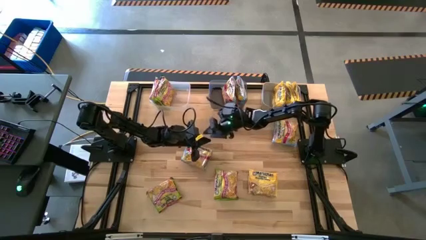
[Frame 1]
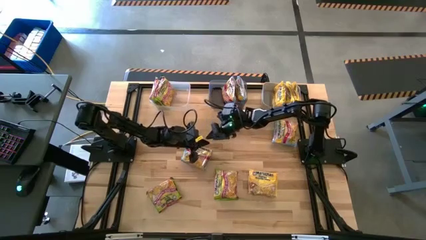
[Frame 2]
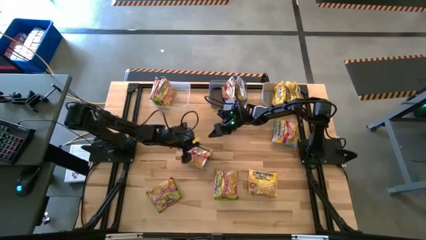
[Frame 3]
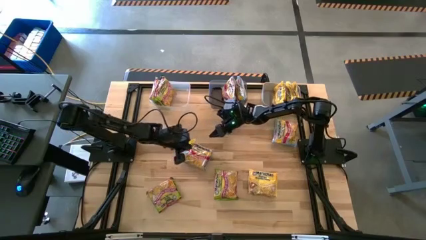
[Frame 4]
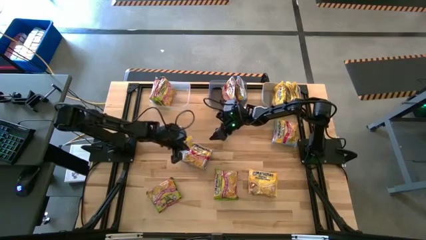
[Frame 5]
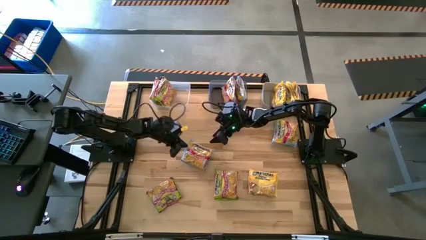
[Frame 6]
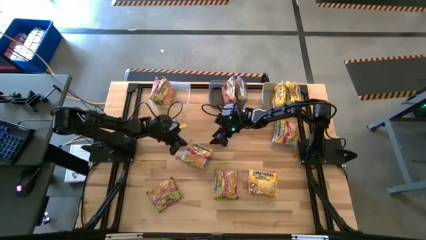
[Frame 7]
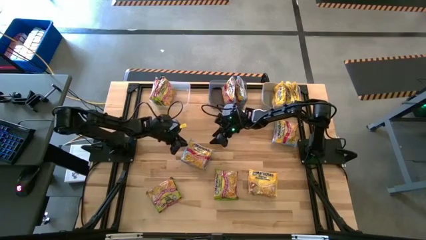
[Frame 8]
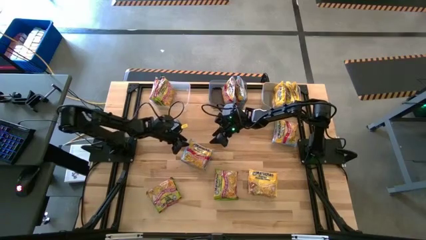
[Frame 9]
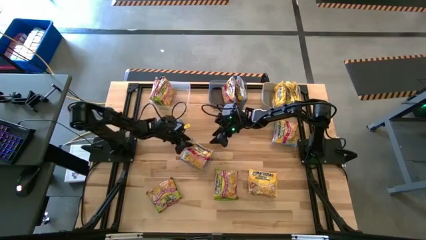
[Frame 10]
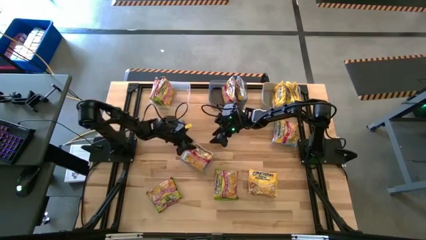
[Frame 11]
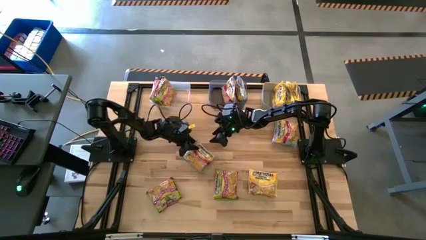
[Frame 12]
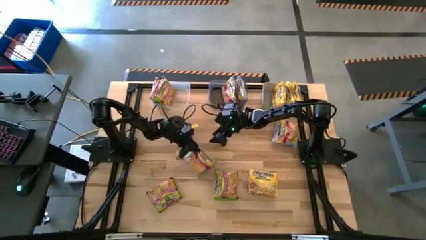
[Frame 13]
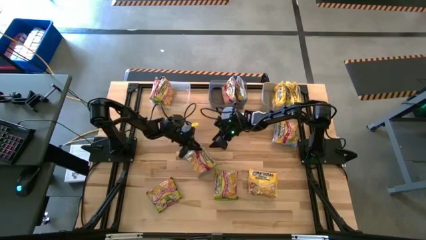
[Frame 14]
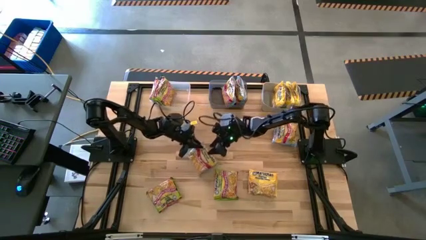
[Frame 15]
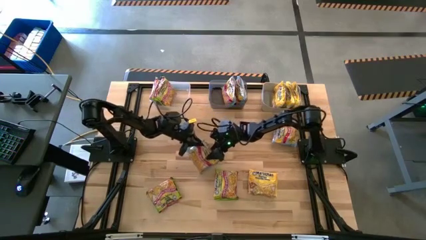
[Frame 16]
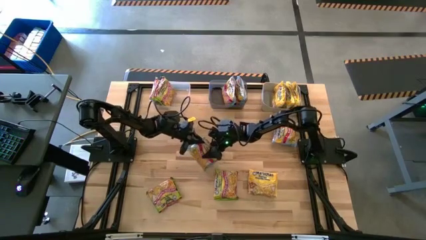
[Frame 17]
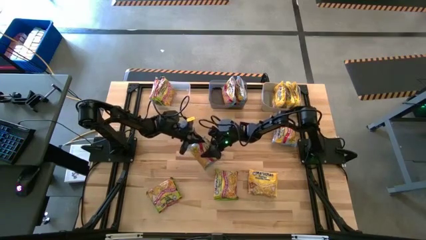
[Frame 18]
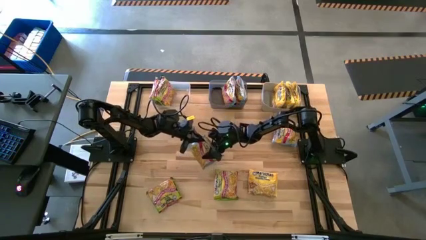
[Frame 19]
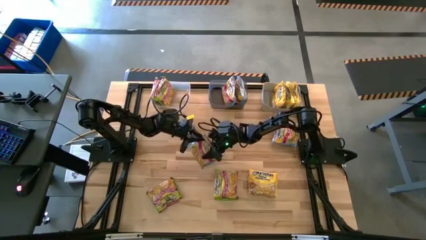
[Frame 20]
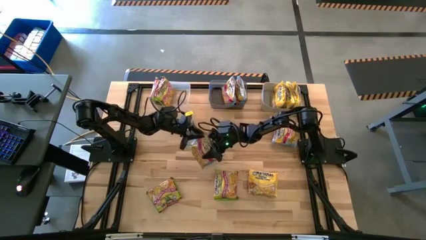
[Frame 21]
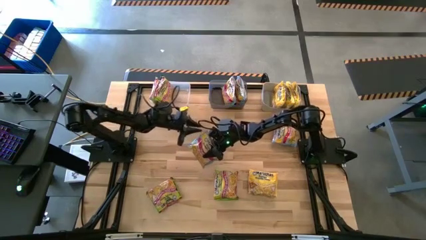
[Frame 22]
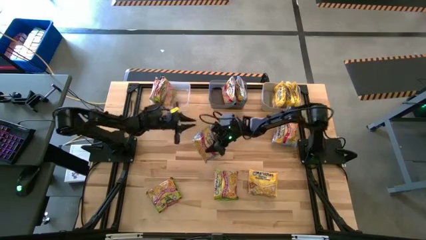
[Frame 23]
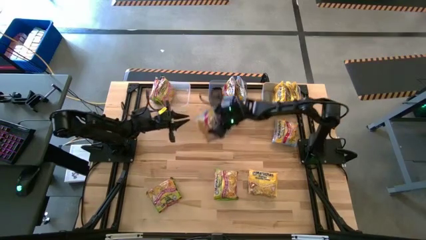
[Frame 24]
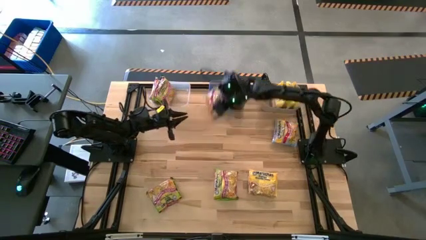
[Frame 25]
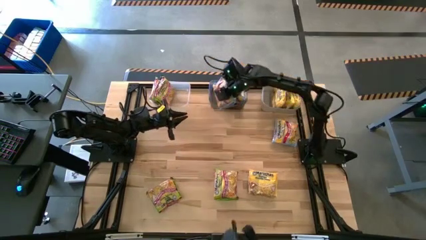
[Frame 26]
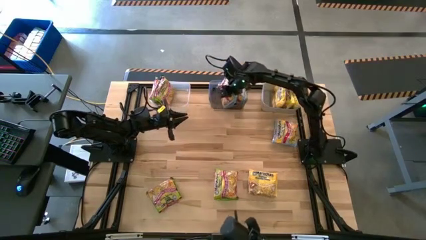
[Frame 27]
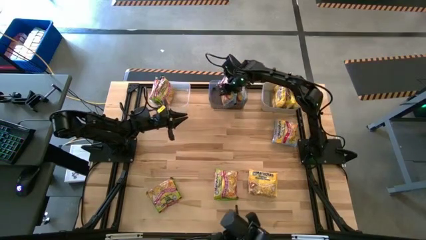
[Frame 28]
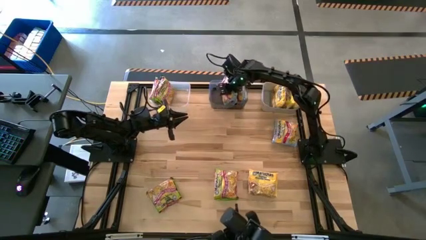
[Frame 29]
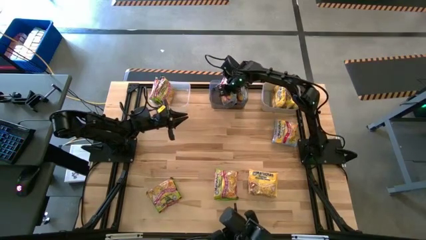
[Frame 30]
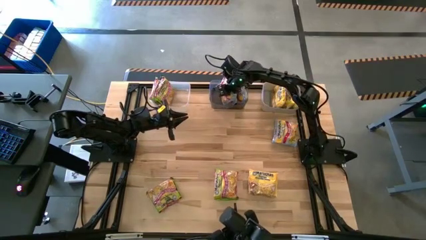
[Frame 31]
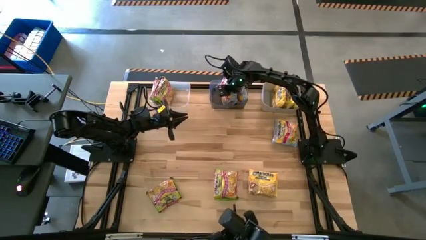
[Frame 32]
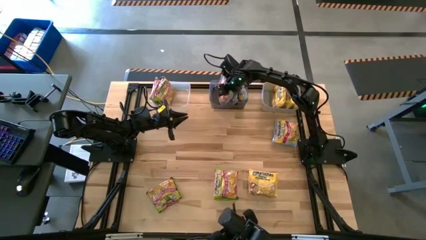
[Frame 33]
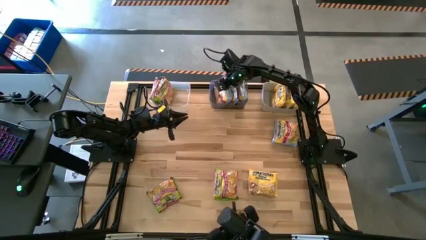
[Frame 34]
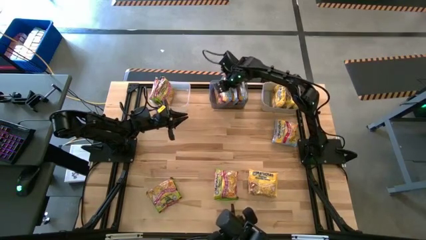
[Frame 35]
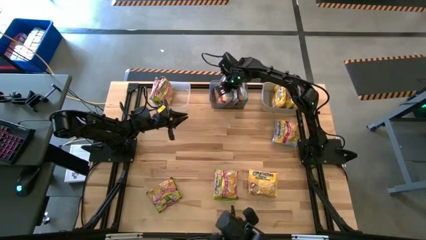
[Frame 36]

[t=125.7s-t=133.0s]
Task: Sort Maruchan noodles
Put the left blue noodle pack into the black bin

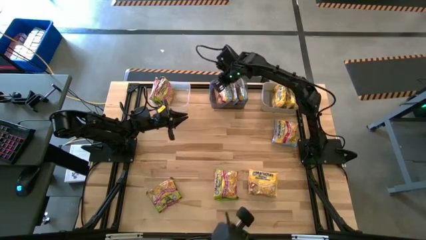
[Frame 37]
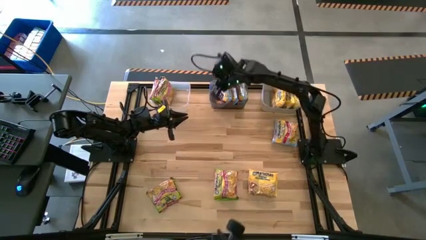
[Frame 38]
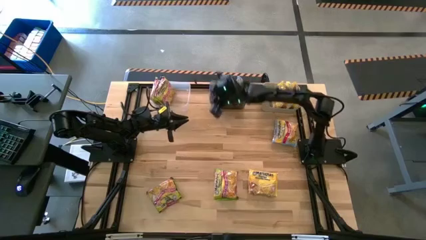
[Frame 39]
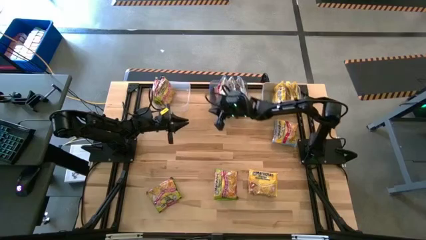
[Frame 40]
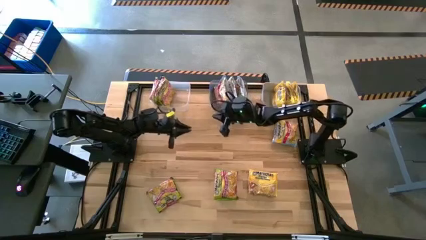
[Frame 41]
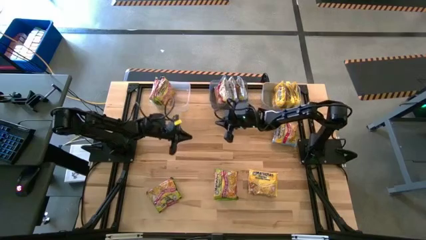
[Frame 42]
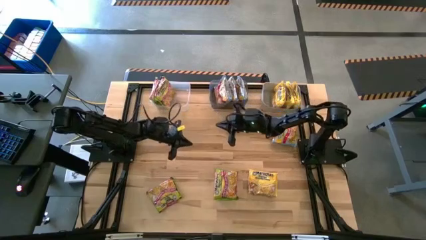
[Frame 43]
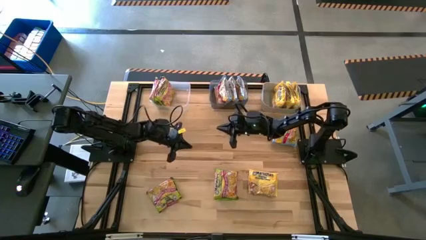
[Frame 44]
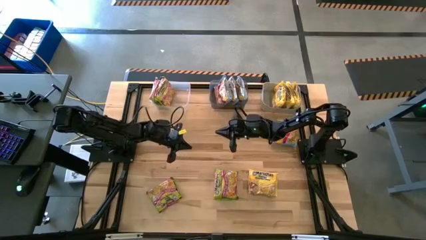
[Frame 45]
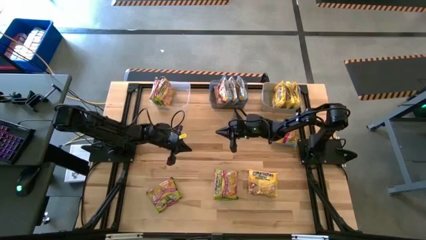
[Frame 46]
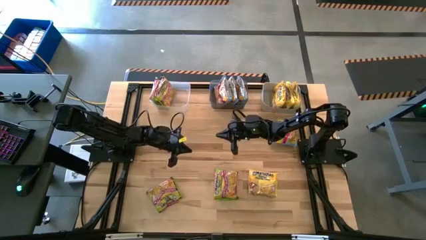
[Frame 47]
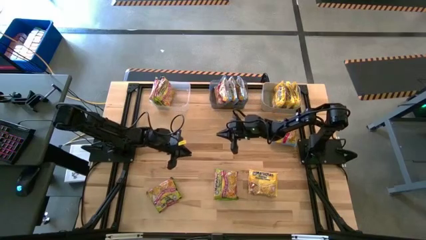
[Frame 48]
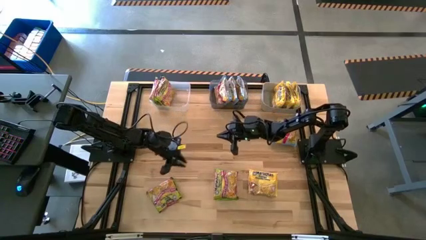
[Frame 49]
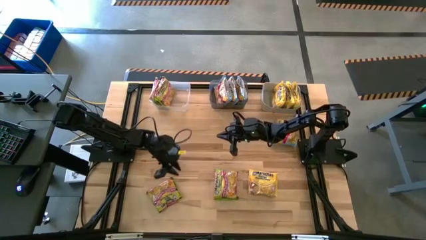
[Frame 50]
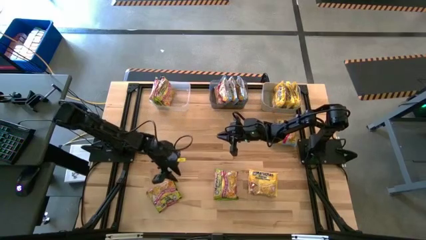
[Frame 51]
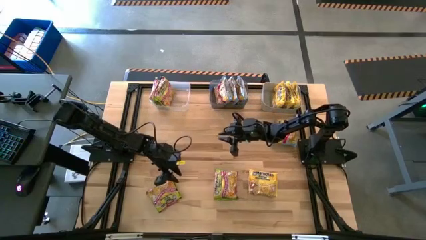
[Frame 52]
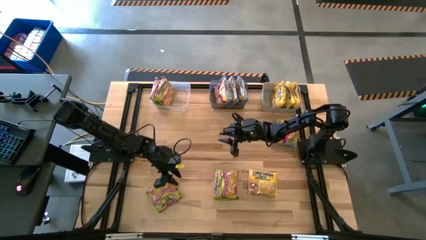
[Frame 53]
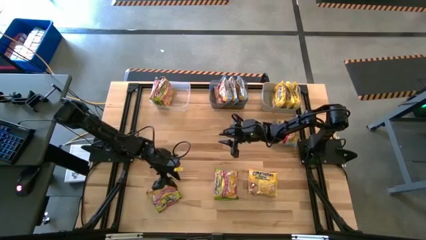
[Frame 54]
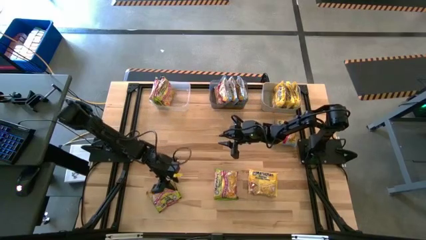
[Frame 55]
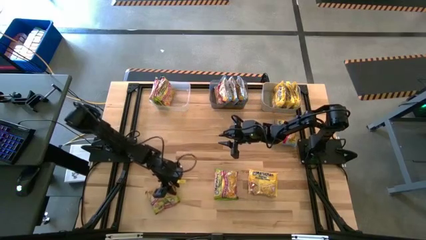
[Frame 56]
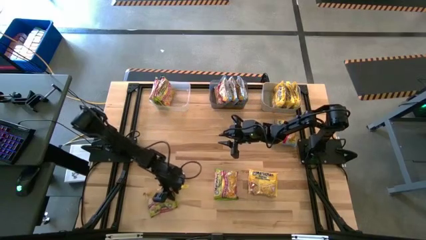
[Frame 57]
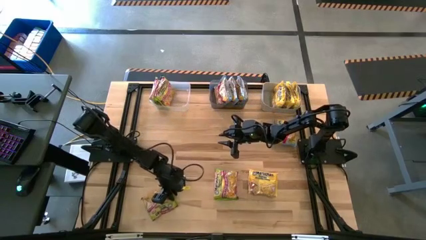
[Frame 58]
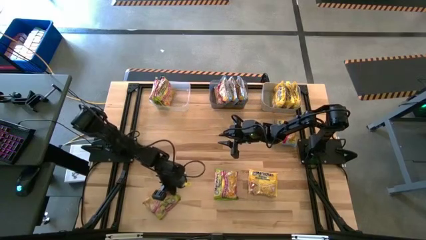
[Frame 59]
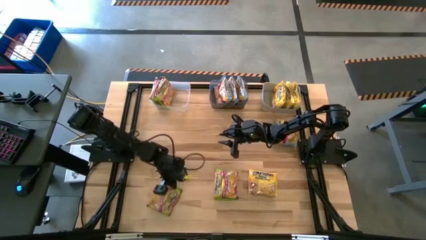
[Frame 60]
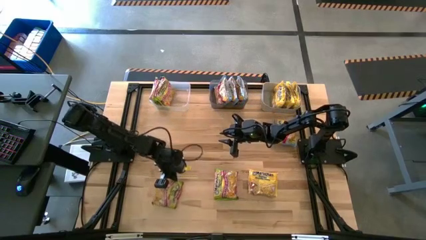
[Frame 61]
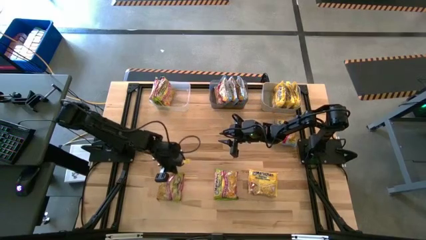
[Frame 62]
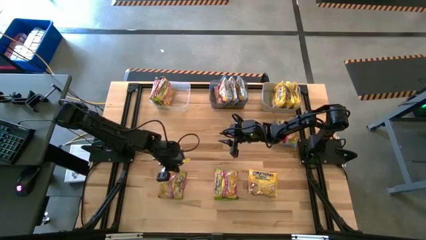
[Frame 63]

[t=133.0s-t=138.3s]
Put the left green noodle pack into the transparent bin
